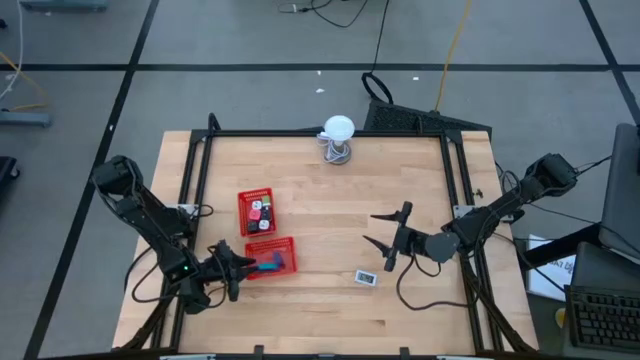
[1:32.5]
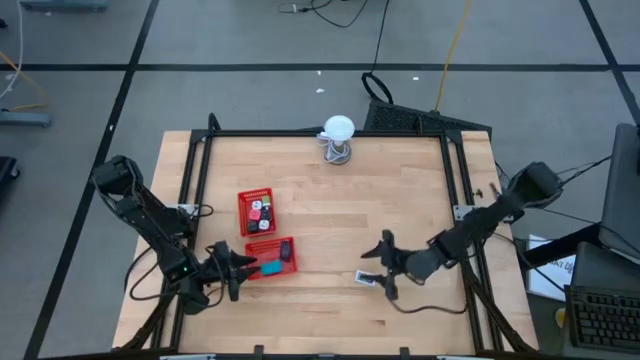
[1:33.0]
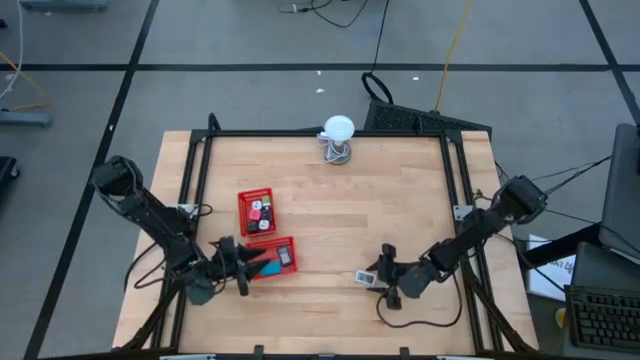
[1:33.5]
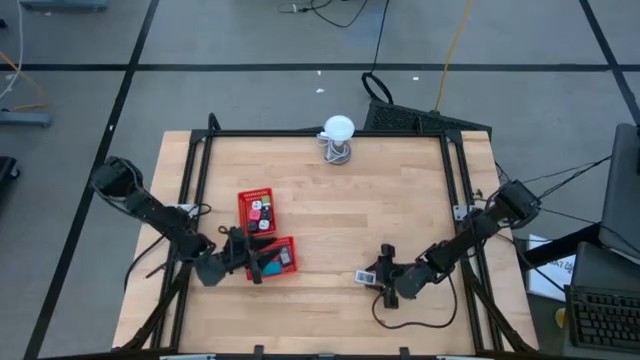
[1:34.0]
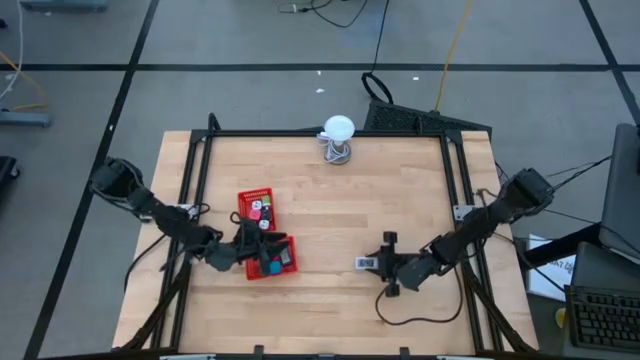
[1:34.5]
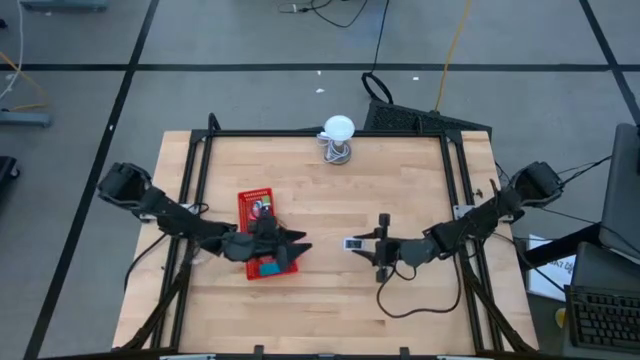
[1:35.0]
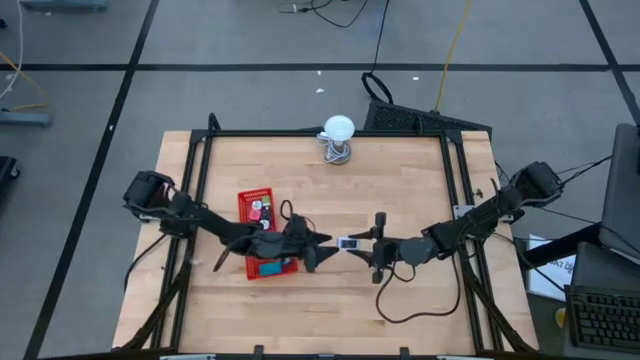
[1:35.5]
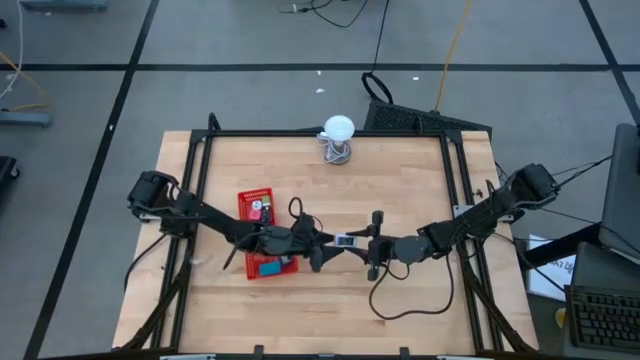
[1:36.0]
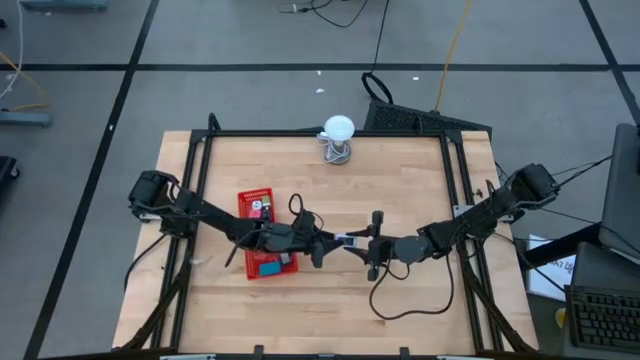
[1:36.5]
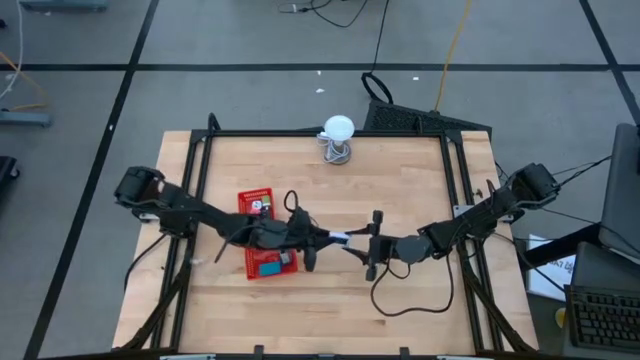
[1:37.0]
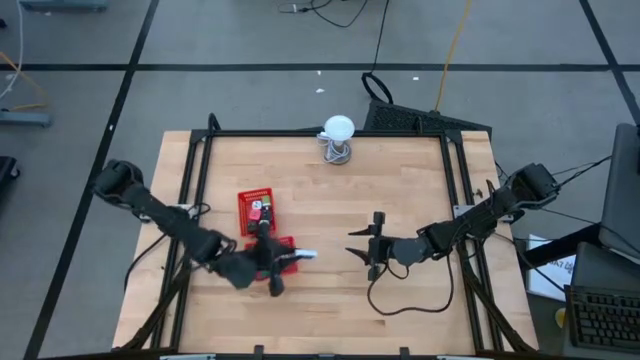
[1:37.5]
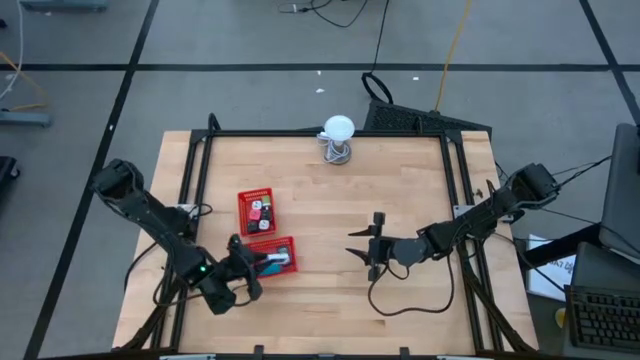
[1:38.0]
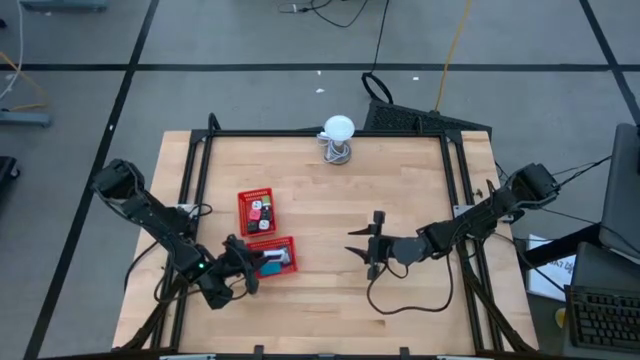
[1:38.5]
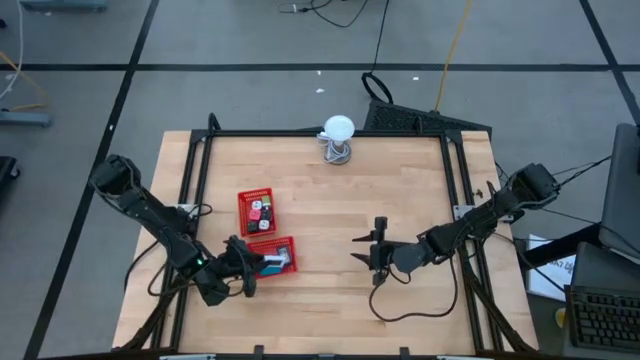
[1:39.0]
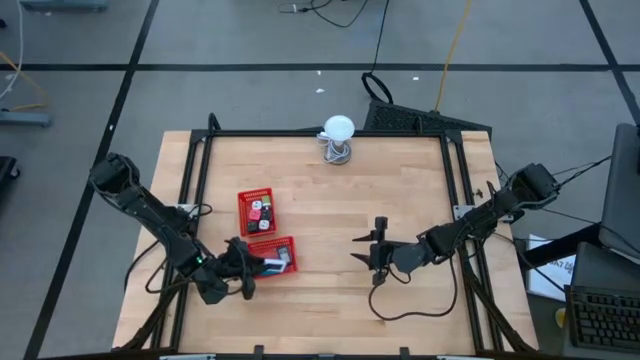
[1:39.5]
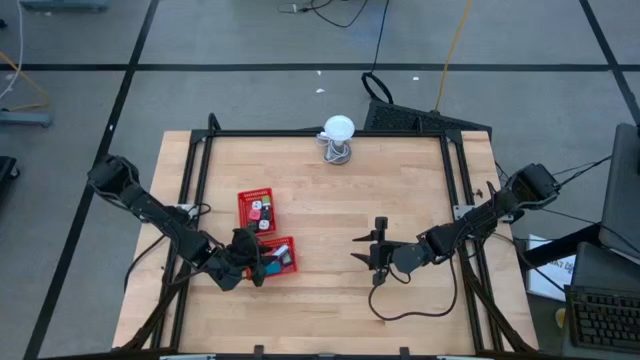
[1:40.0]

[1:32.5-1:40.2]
Task: Pick & Place Office items
Put the white digital timer into the bottom red basket

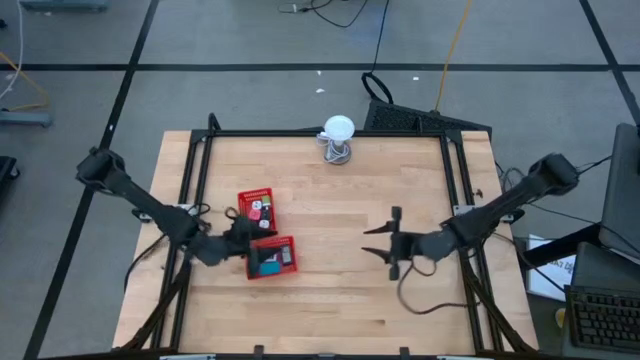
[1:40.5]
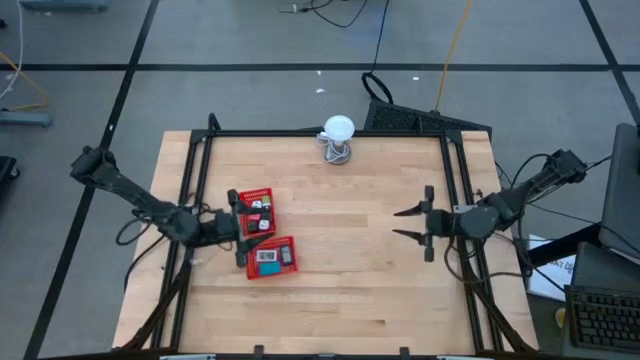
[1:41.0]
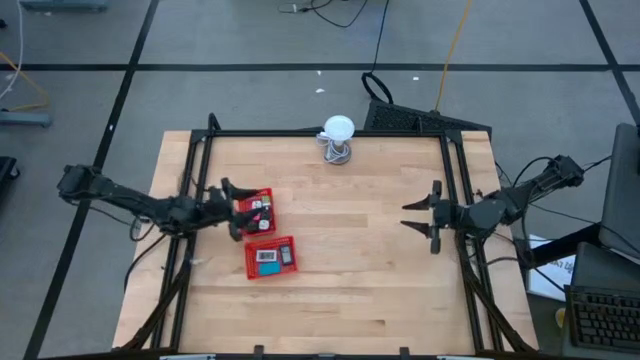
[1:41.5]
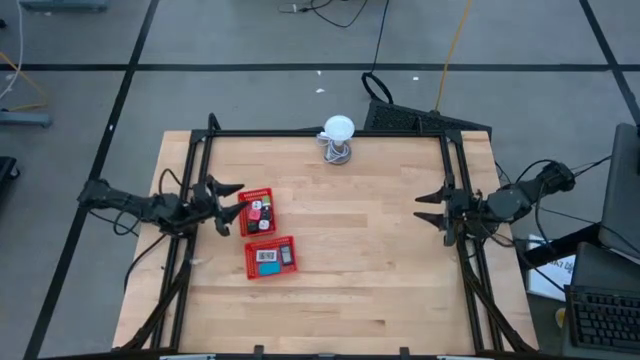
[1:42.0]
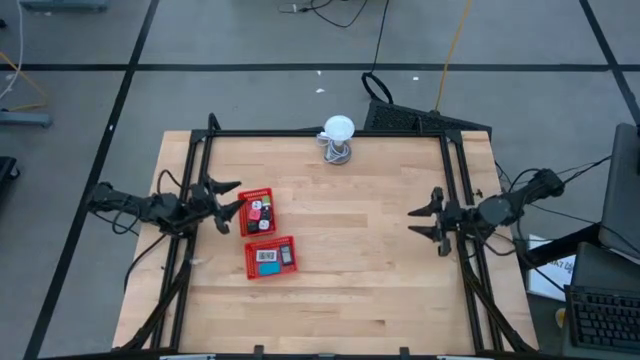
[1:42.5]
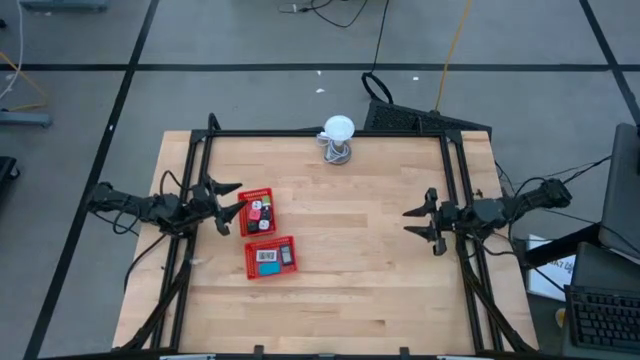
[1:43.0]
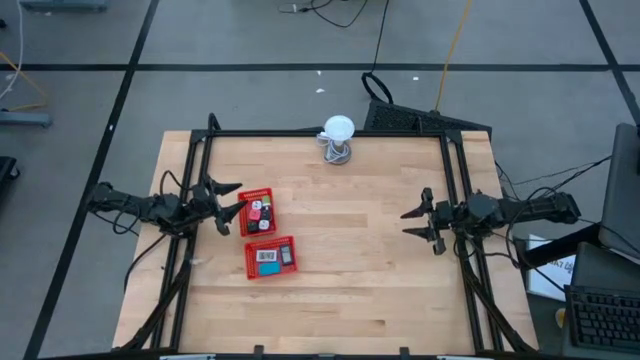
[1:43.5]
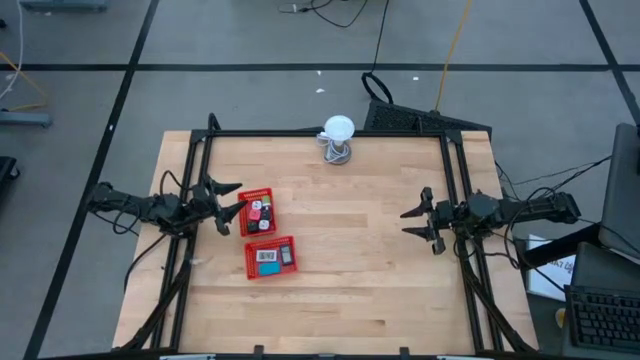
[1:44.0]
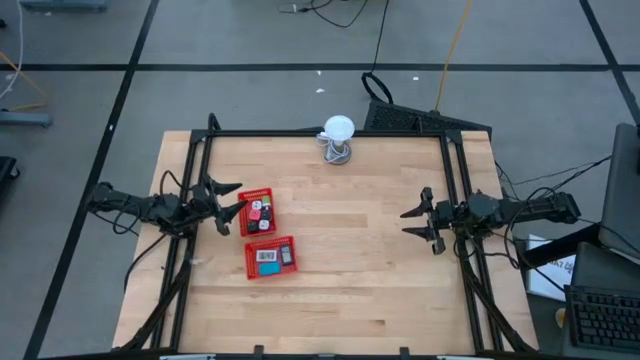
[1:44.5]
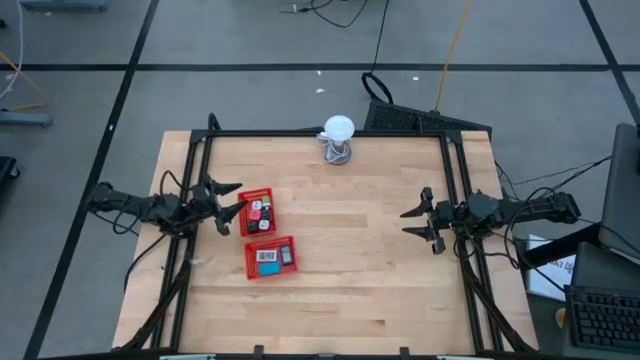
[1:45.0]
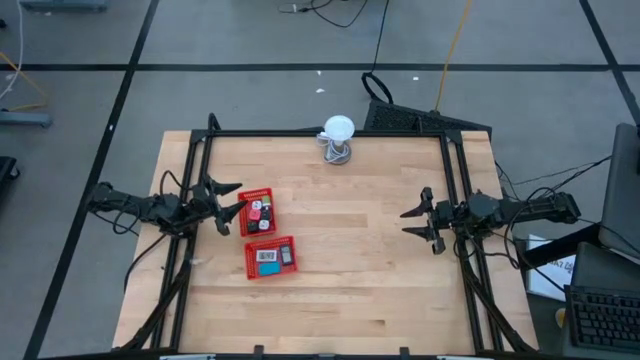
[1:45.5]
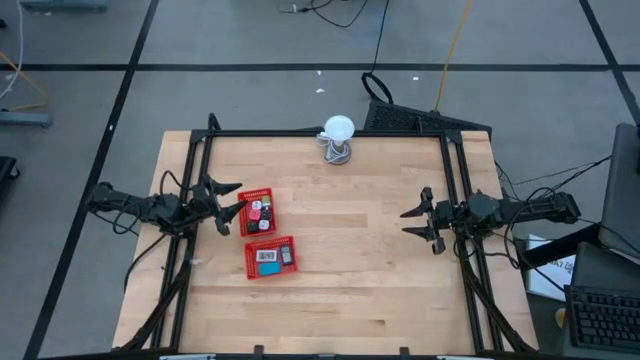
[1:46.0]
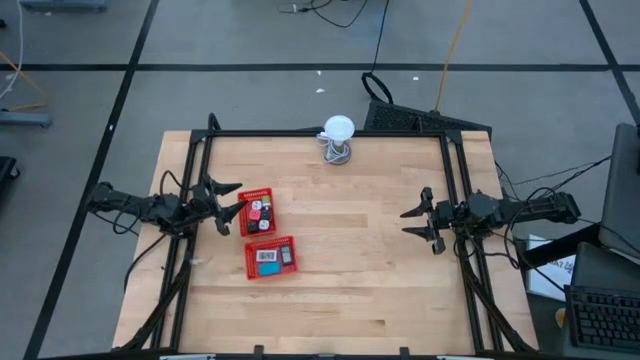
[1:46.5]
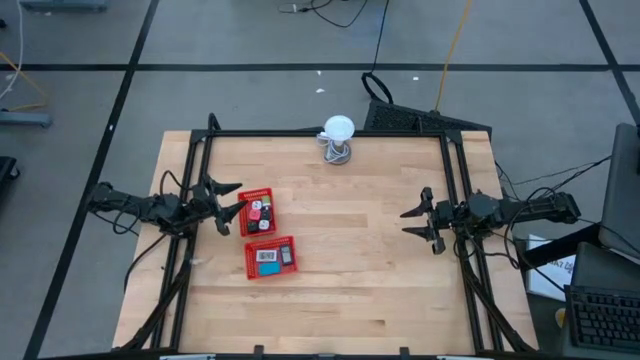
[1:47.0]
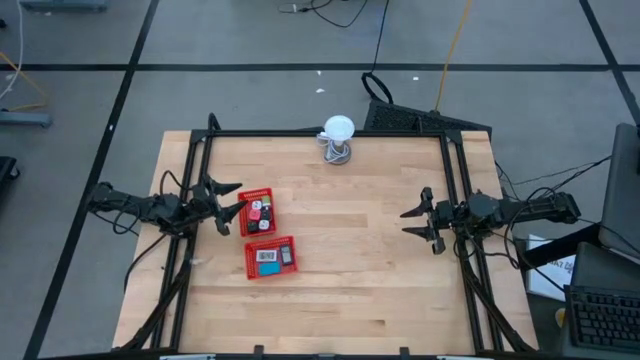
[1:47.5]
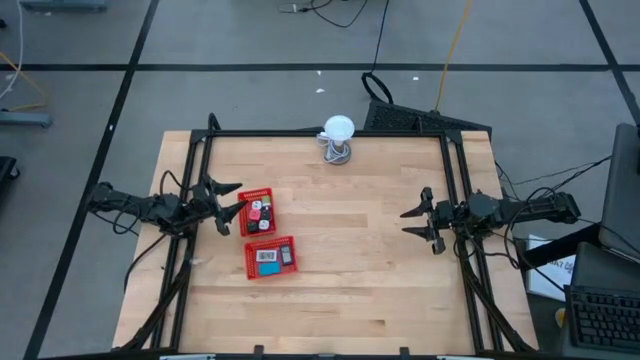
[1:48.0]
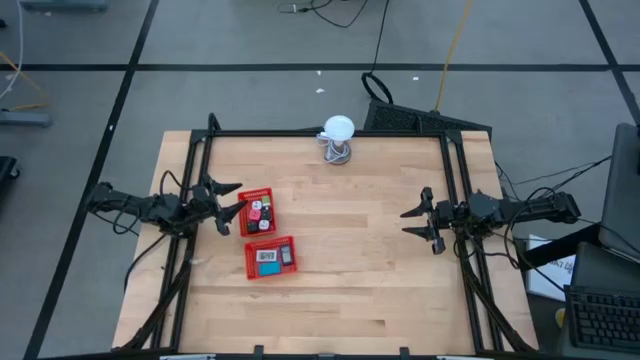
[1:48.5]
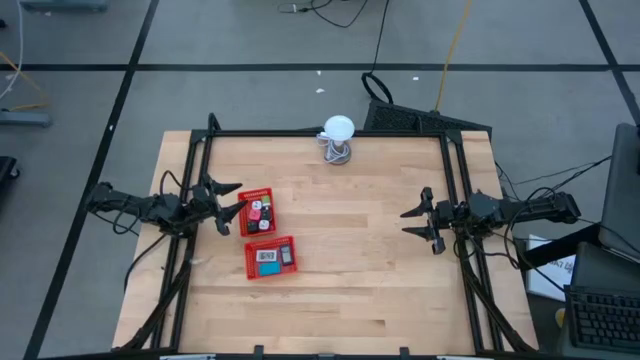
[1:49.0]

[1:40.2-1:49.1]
Return to Home Position

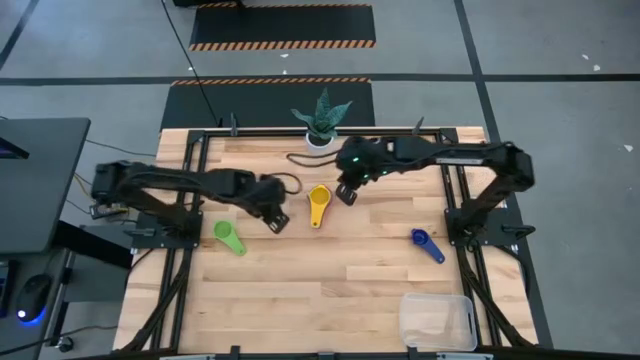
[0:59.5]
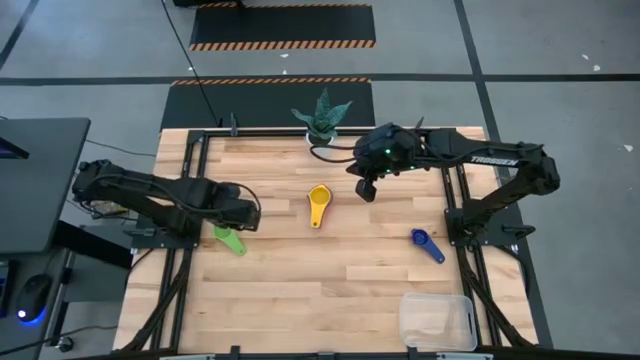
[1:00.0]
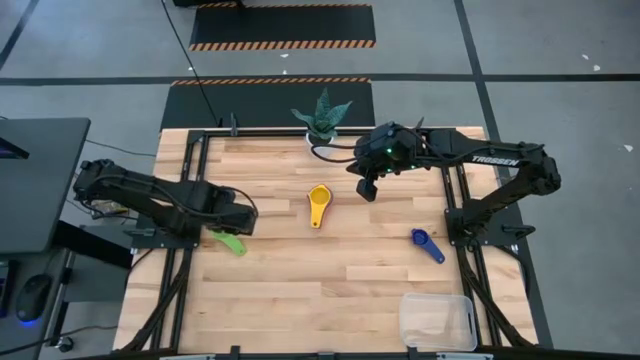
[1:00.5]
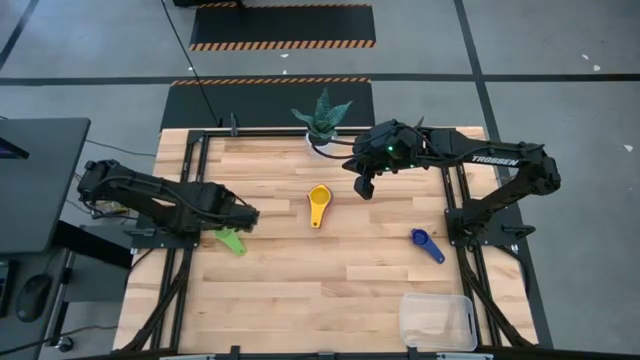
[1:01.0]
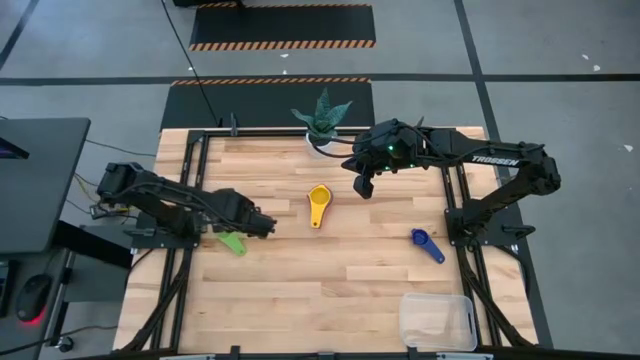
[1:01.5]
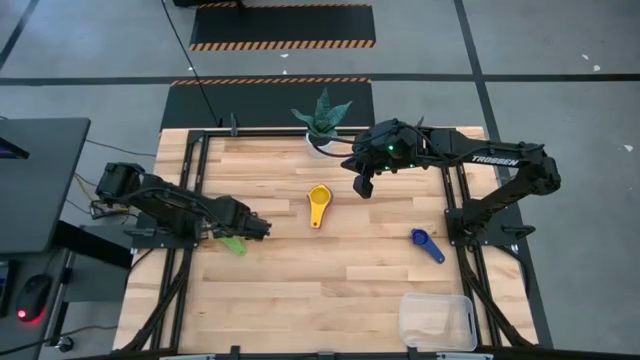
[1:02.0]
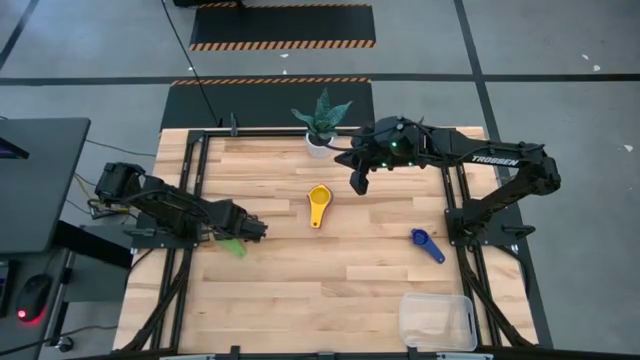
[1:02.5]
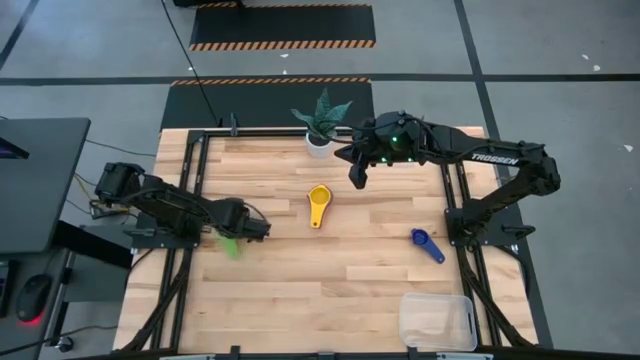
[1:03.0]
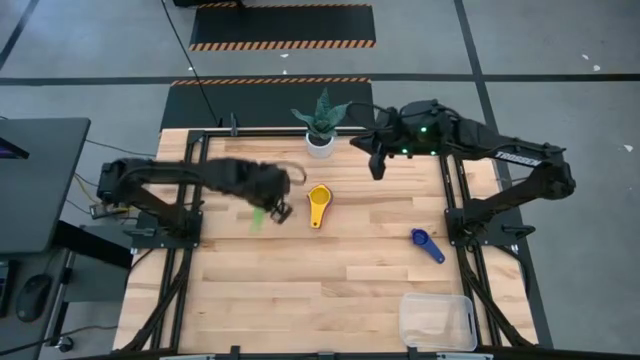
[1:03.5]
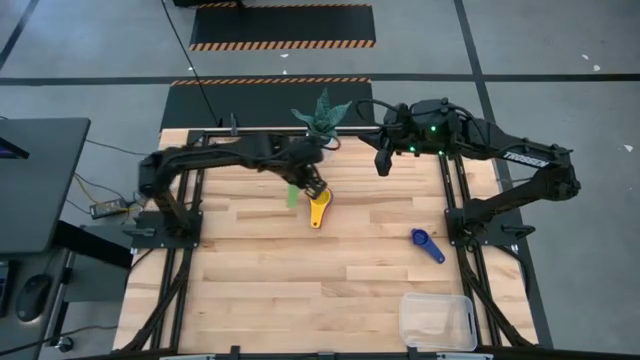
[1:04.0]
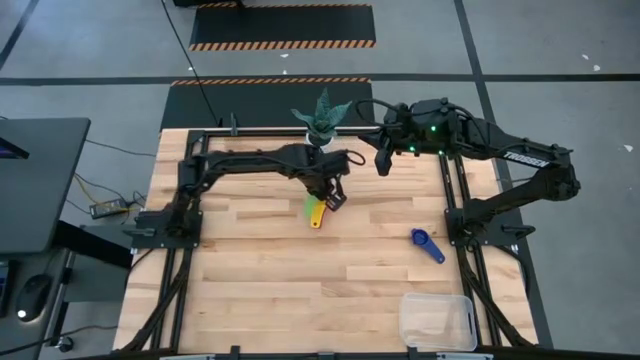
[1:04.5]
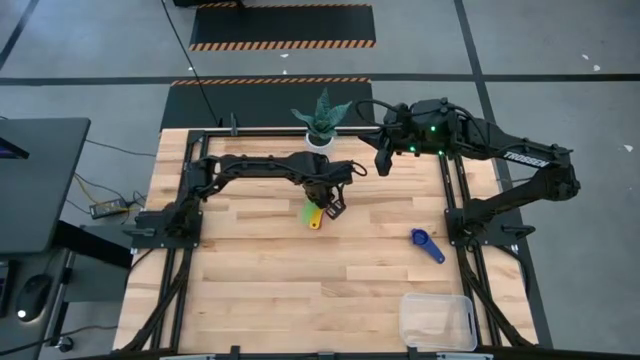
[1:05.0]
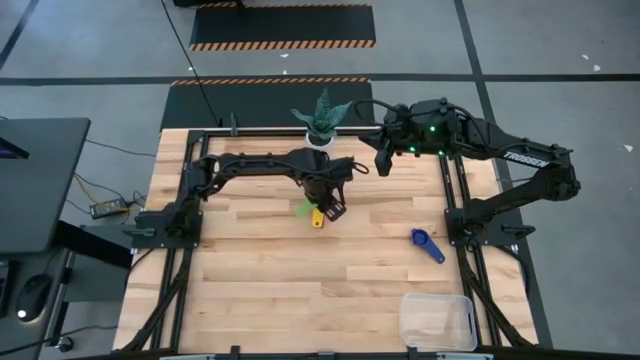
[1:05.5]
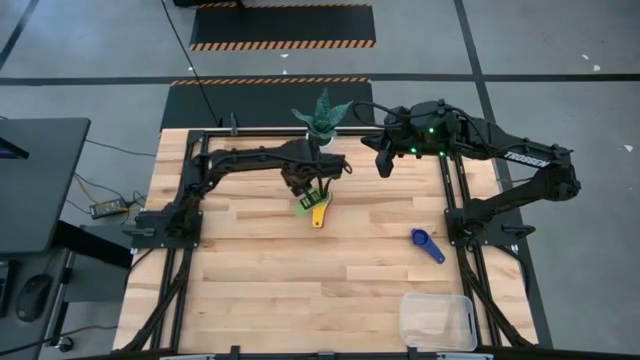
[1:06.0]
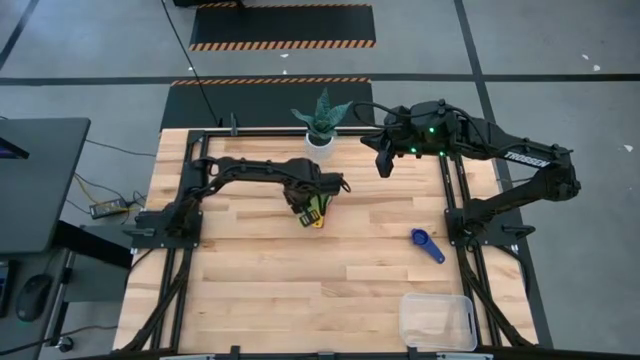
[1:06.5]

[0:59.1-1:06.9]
Task: Nest measuring cups in basket
Stack the green measuring cup on top of the yellow measuring cup
